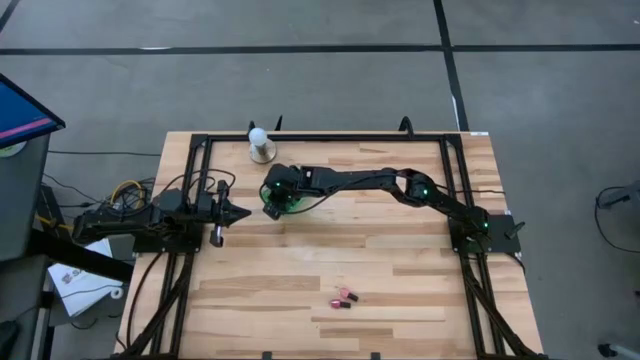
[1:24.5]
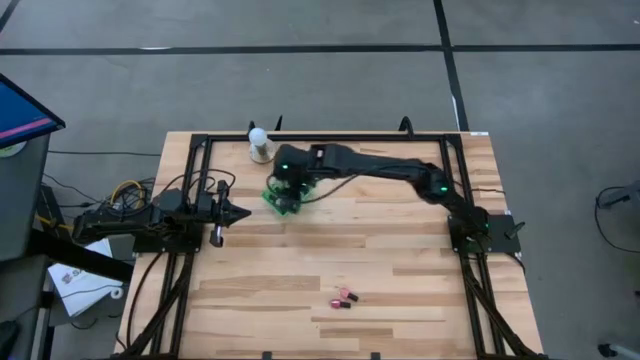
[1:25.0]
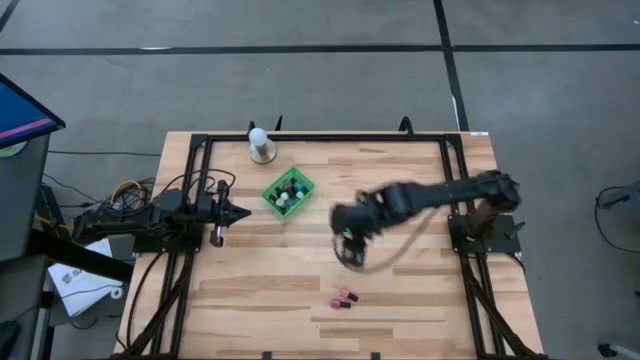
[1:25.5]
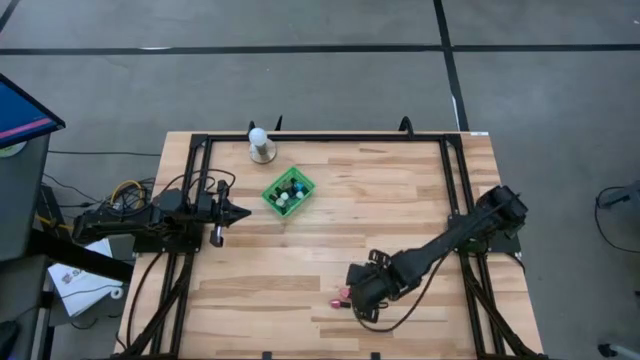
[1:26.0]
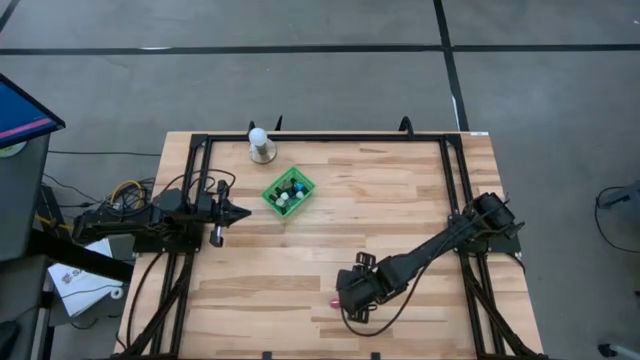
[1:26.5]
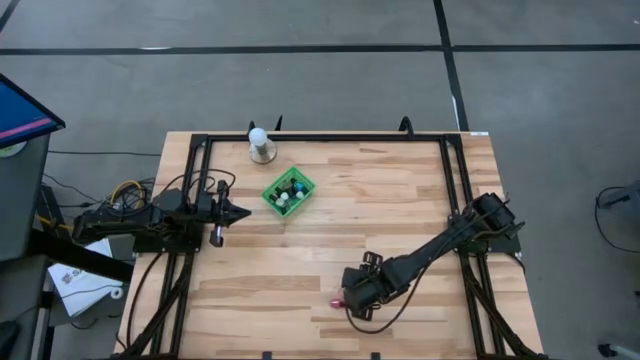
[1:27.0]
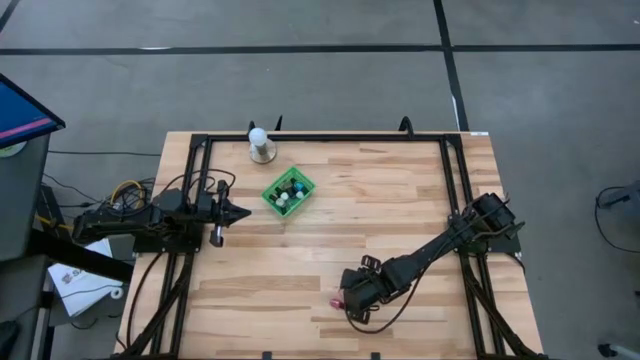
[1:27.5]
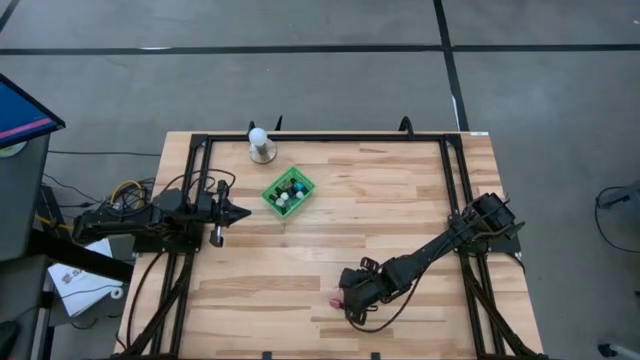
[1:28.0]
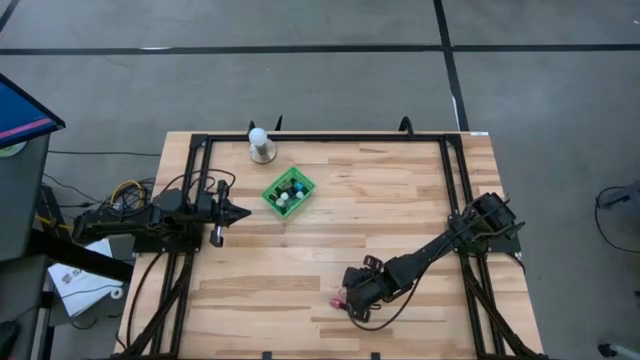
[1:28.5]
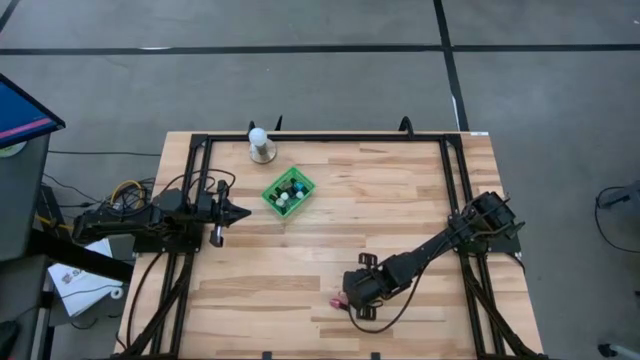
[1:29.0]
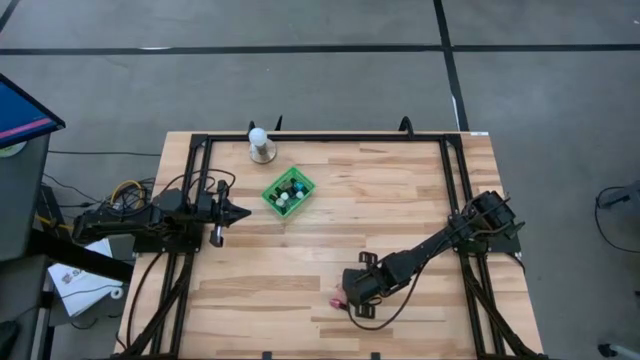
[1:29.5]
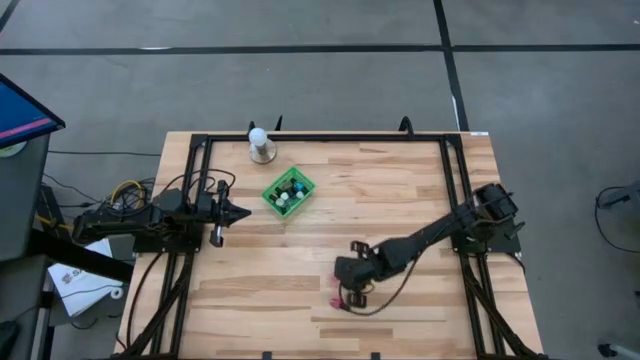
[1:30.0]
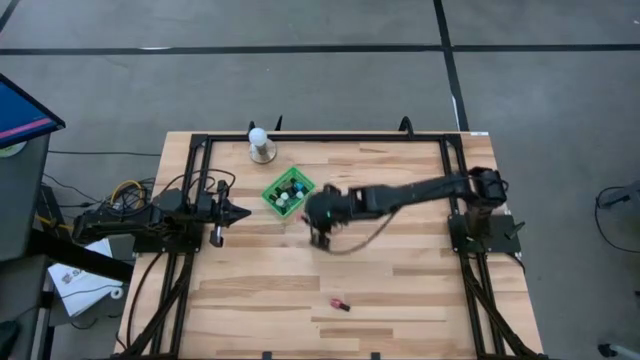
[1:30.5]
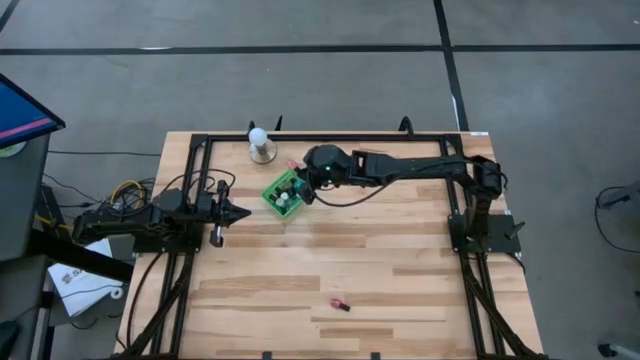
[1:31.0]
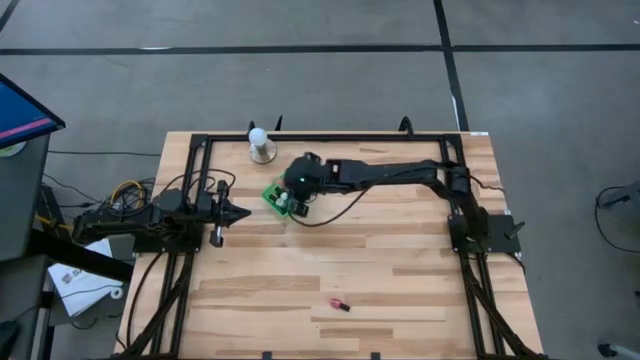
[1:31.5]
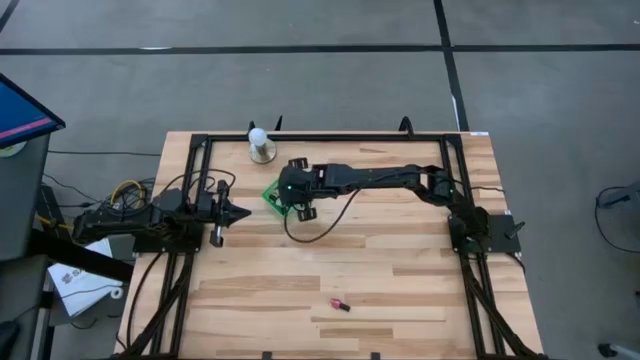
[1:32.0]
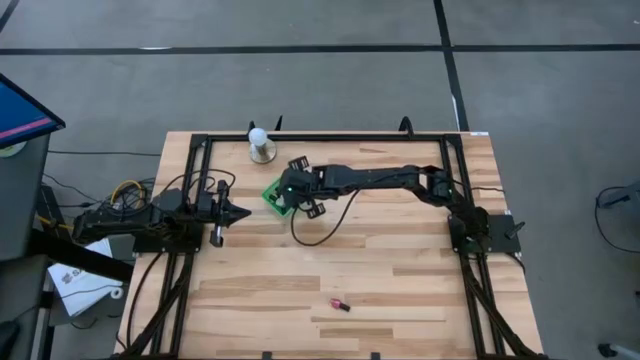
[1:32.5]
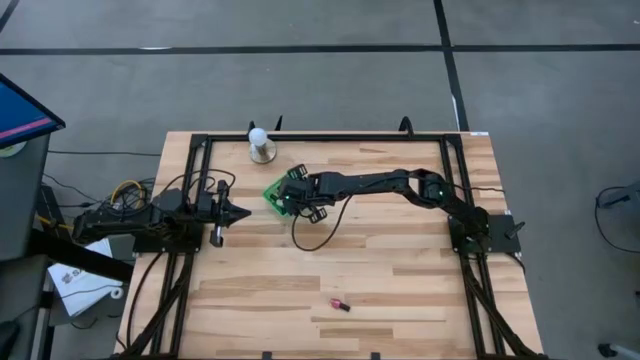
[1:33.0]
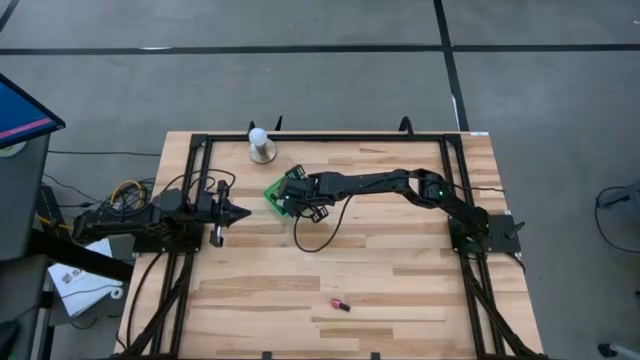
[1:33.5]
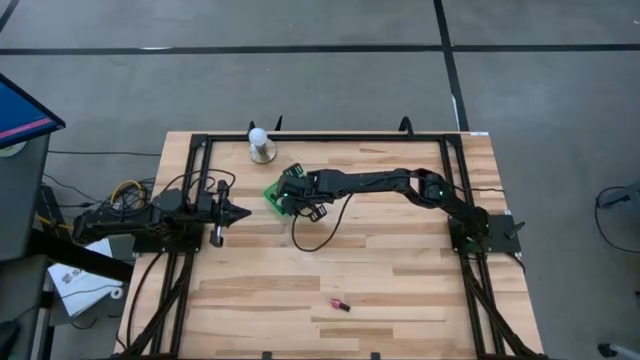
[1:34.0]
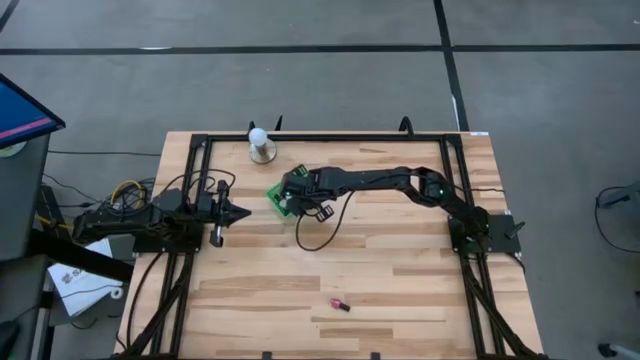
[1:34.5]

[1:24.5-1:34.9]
Task: Pick & Place Nail Polish
Put the light pink nail polish bottle into the green bin

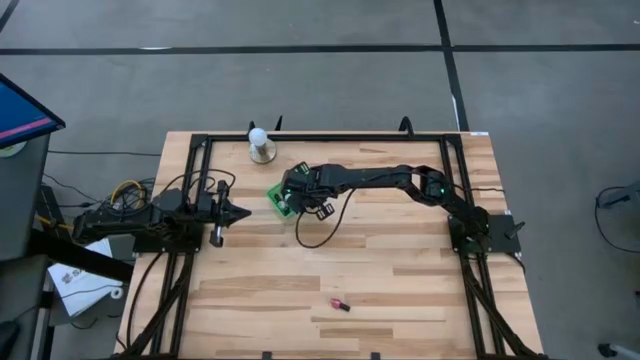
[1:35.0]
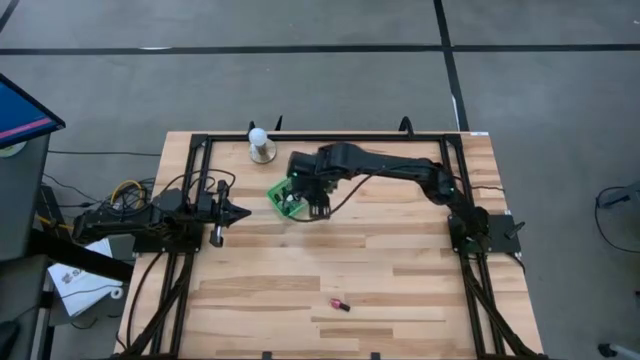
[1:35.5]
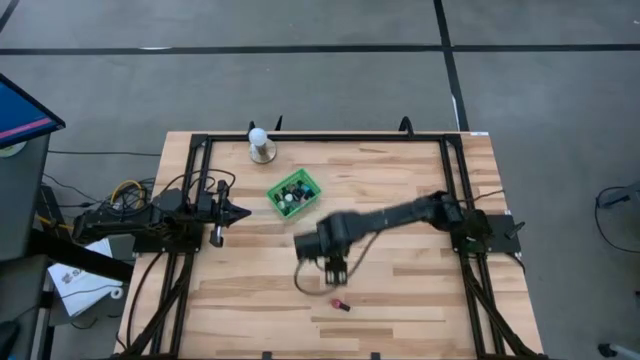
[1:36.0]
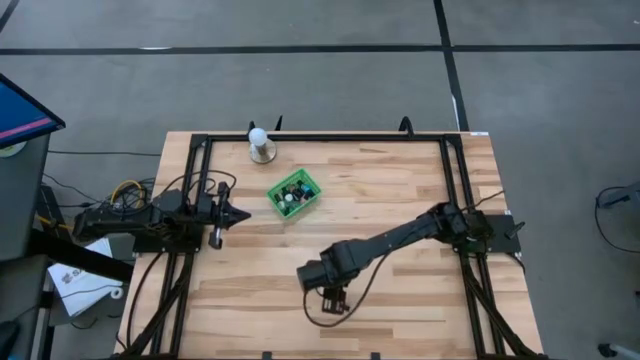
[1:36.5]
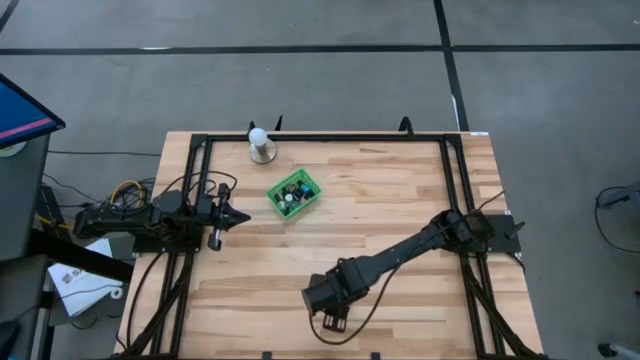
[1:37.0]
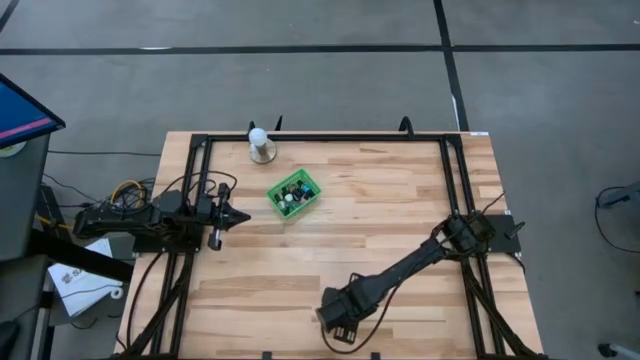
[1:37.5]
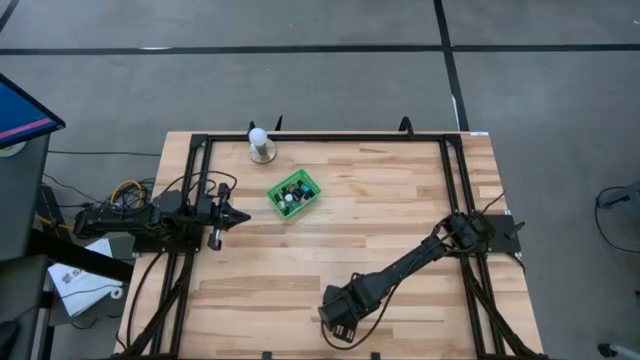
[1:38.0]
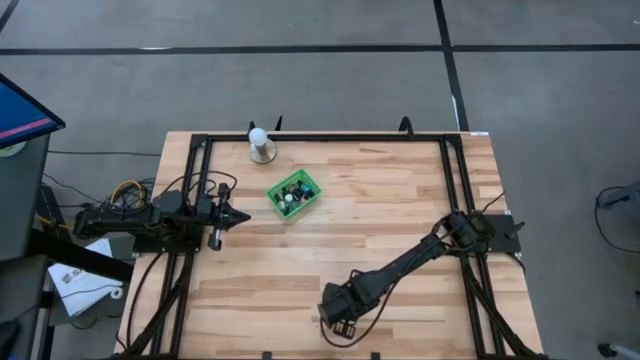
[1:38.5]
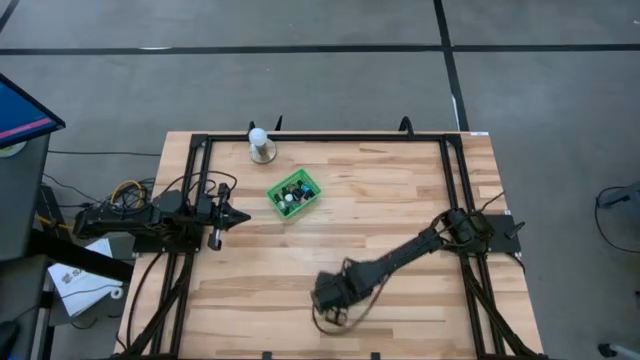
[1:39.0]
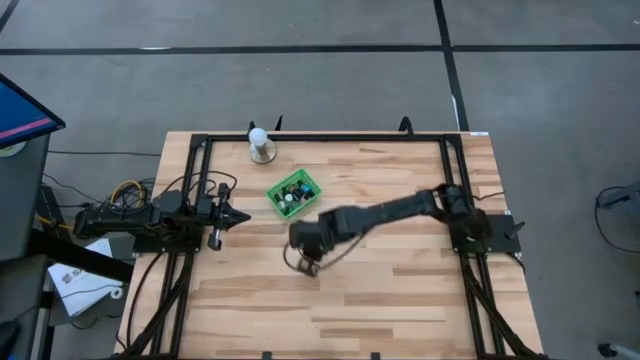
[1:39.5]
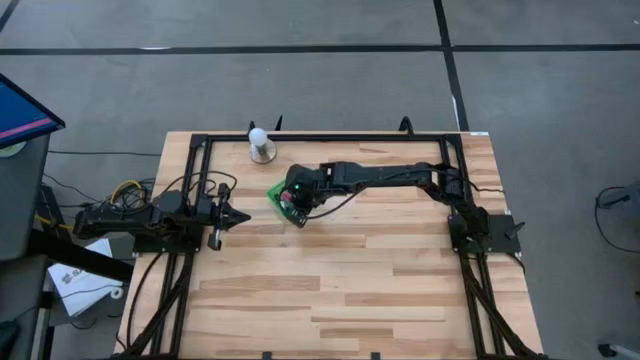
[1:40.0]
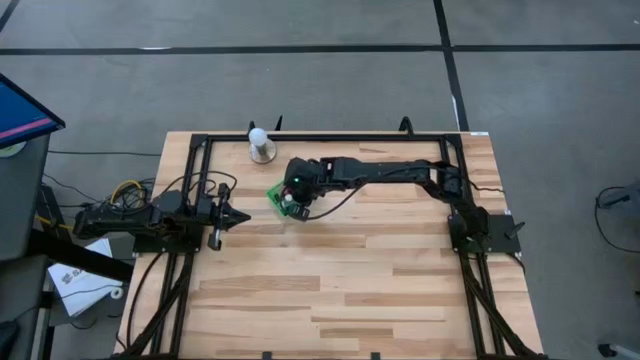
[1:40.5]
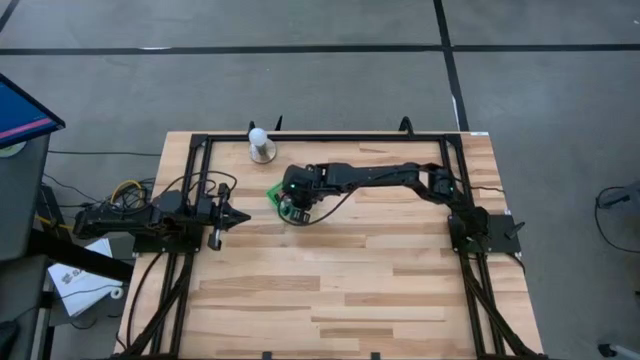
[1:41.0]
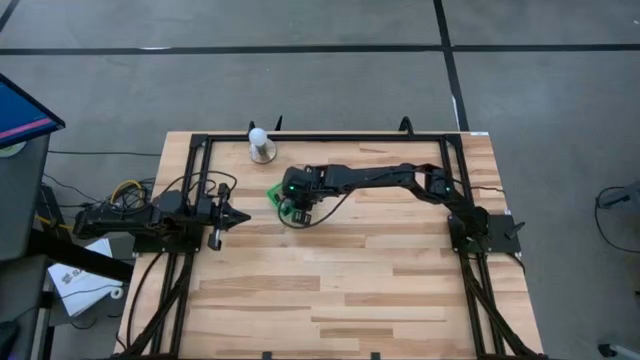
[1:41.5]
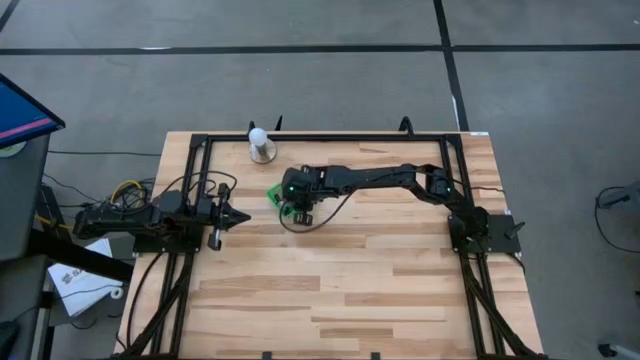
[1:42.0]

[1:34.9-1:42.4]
Put the dark pink nail polish bottle into the green bin

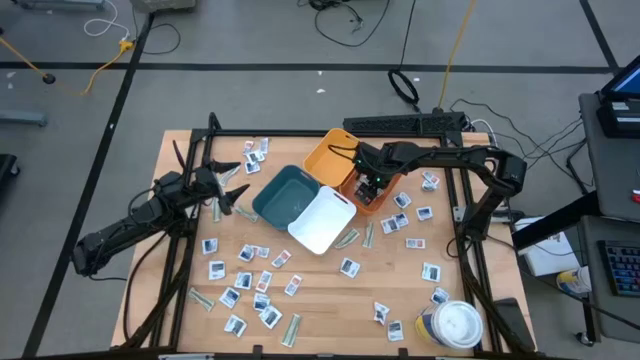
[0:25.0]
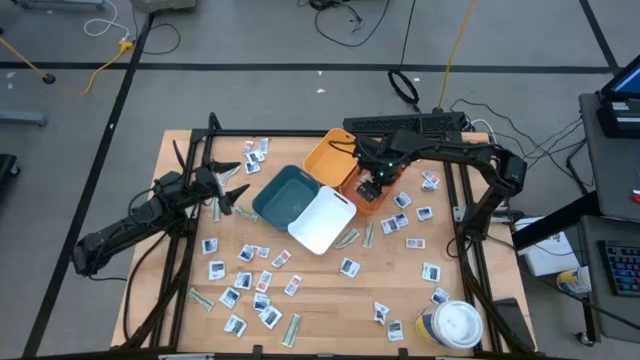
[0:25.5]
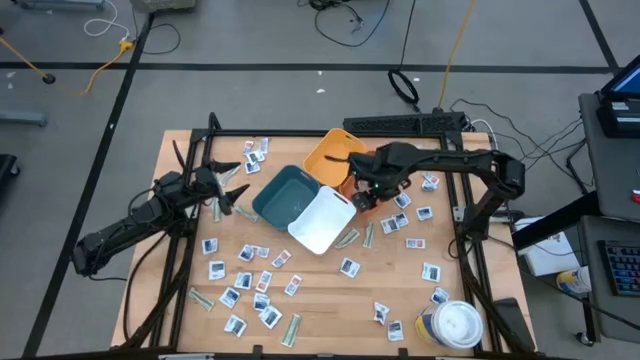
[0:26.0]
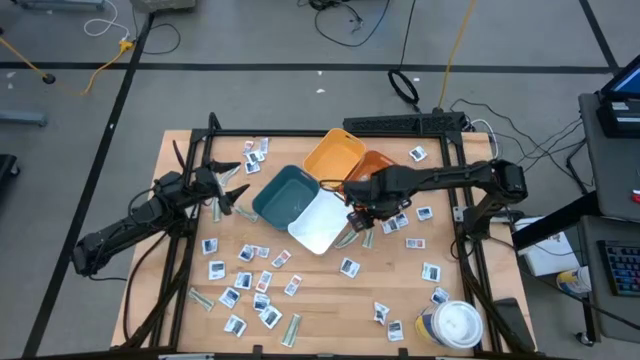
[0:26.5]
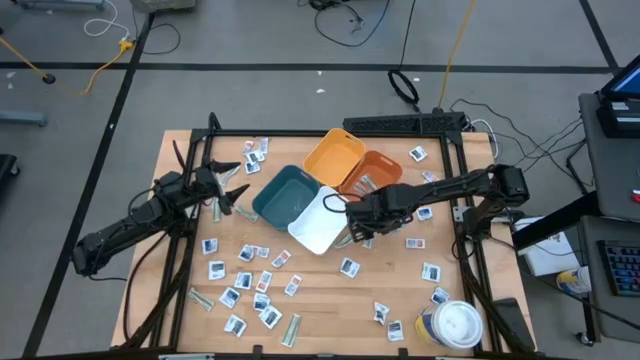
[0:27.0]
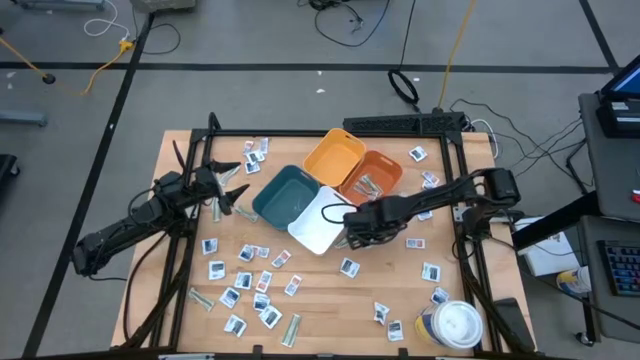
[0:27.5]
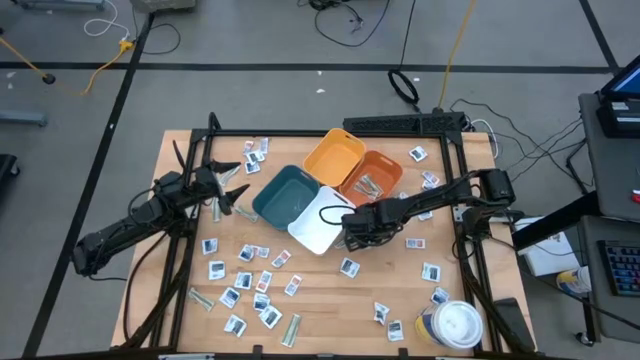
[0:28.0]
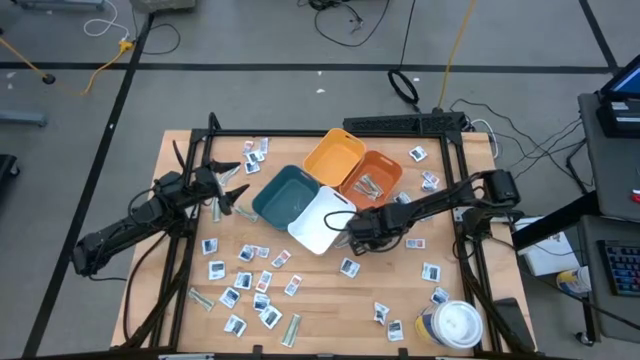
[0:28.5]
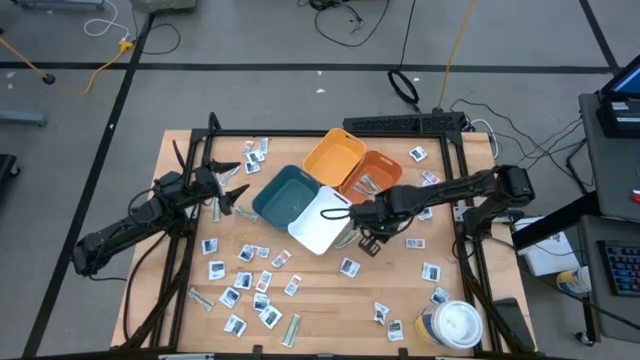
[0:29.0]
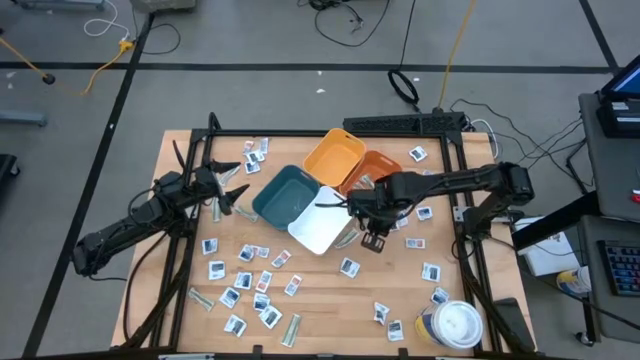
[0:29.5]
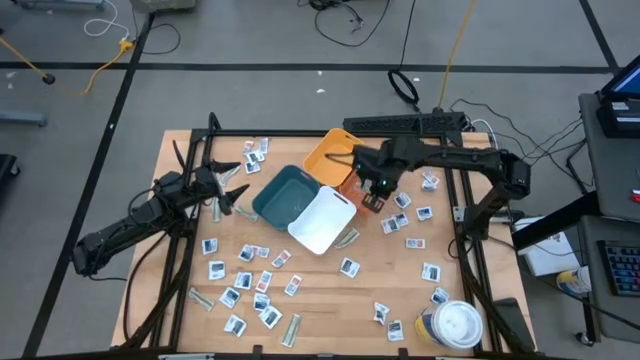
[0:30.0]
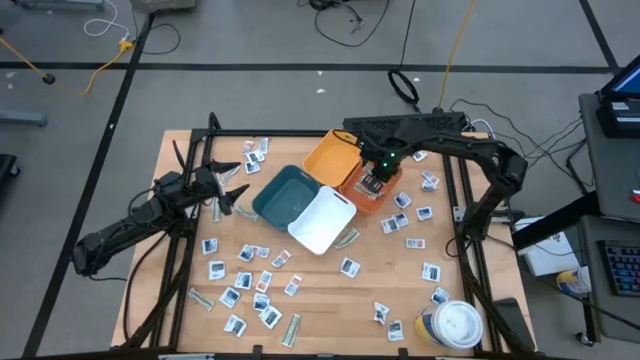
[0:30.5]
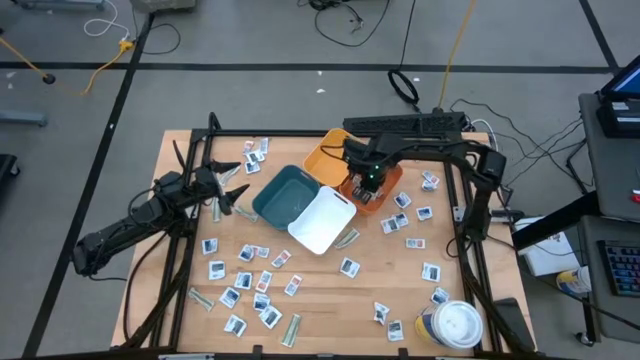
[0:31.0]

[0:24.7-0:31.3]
Task: Pick & Place First Aid Supplies
Put the green bandage pack into the orange bin
